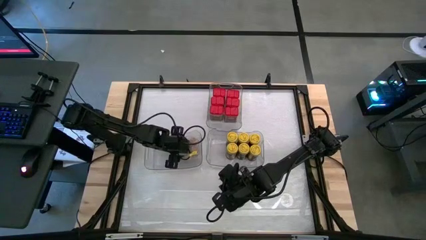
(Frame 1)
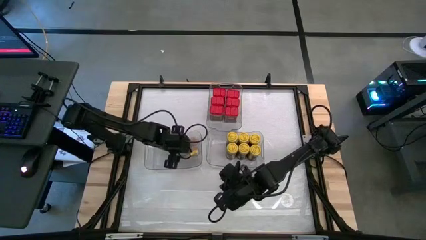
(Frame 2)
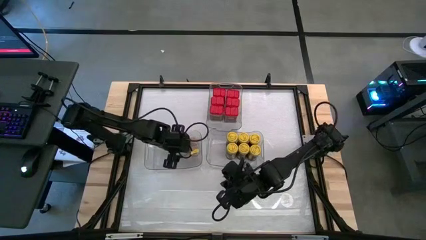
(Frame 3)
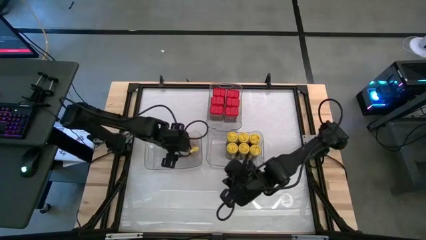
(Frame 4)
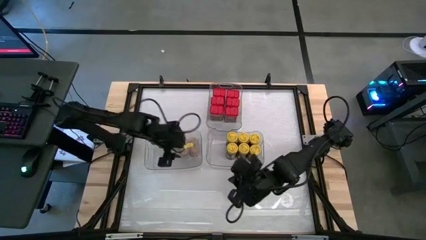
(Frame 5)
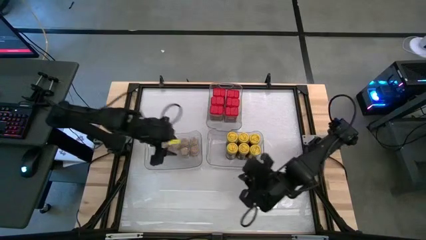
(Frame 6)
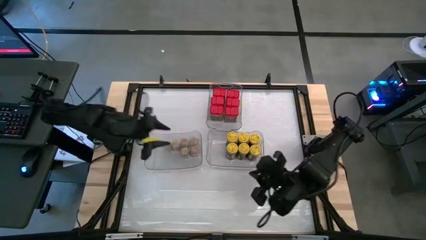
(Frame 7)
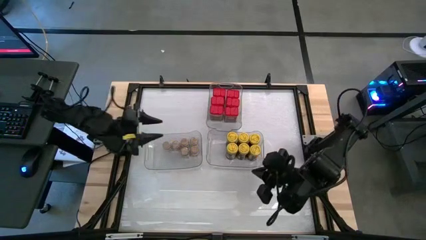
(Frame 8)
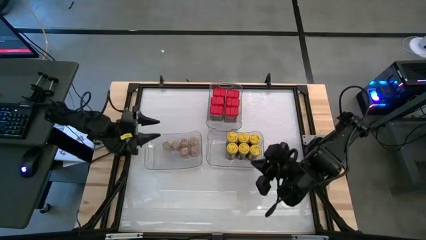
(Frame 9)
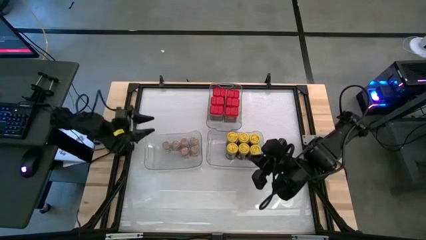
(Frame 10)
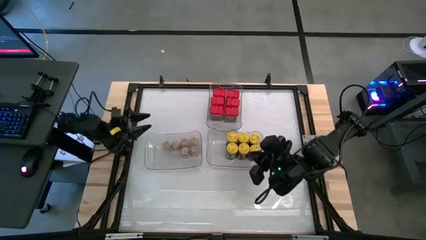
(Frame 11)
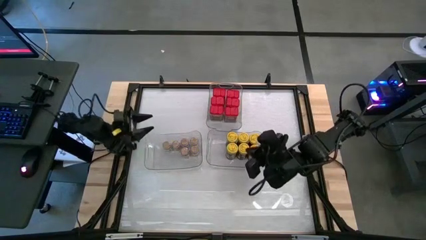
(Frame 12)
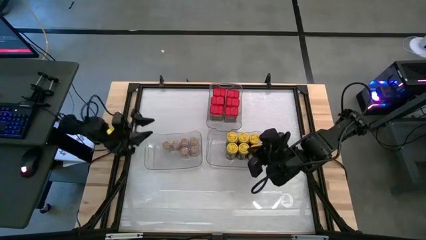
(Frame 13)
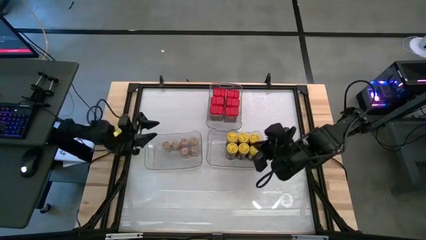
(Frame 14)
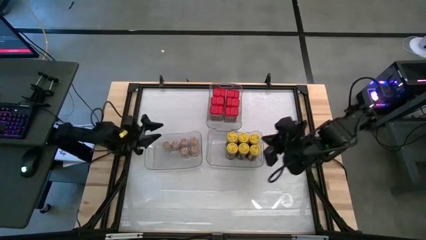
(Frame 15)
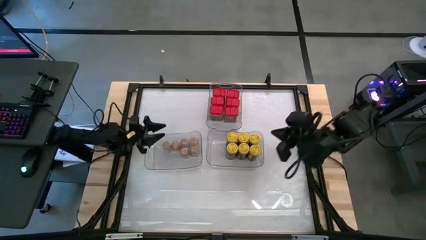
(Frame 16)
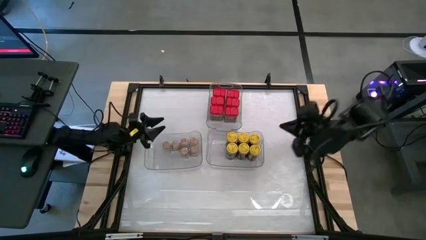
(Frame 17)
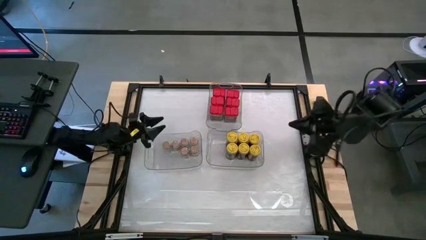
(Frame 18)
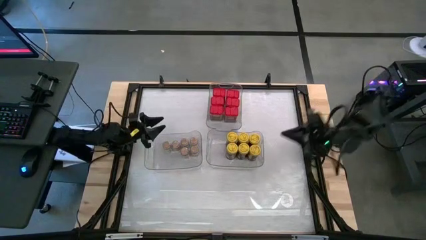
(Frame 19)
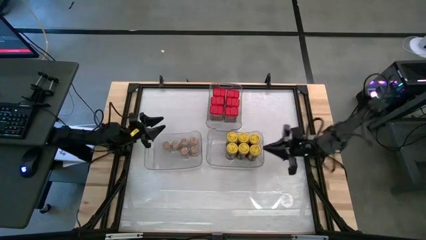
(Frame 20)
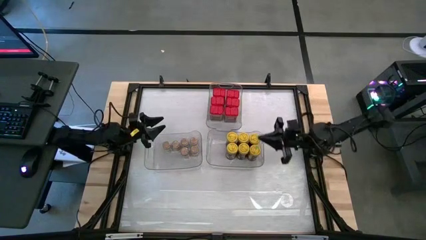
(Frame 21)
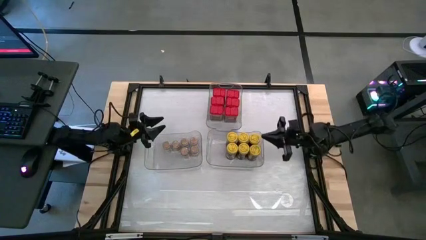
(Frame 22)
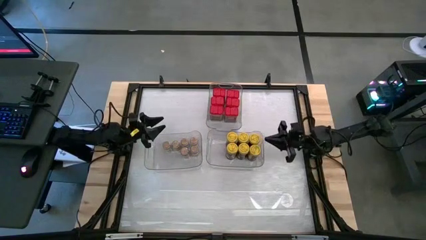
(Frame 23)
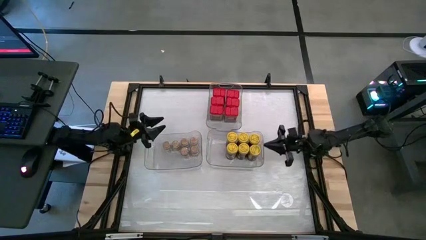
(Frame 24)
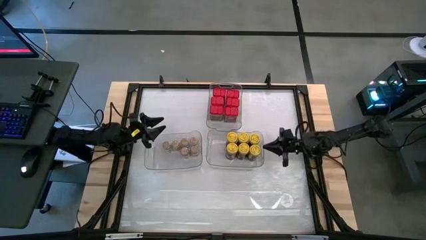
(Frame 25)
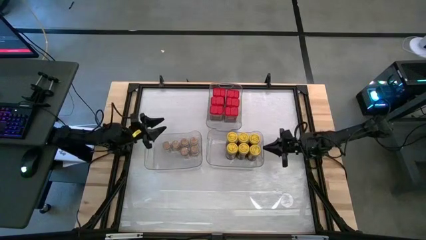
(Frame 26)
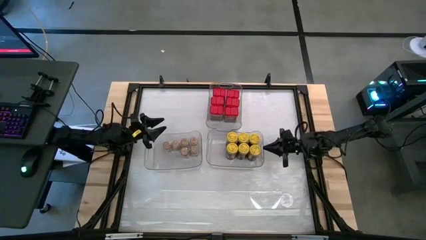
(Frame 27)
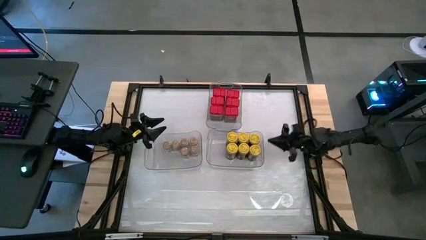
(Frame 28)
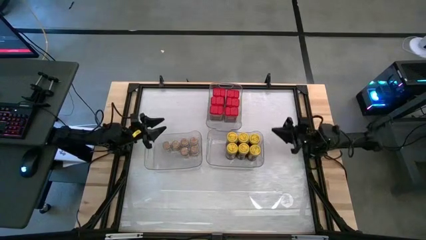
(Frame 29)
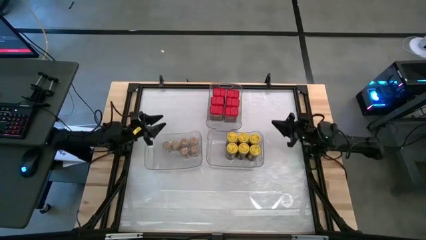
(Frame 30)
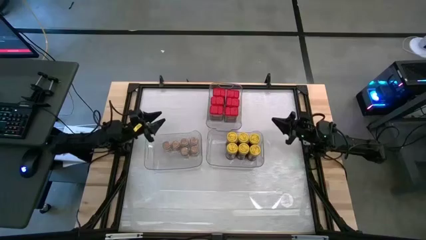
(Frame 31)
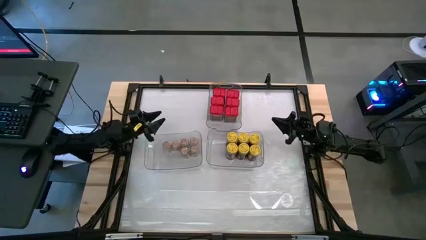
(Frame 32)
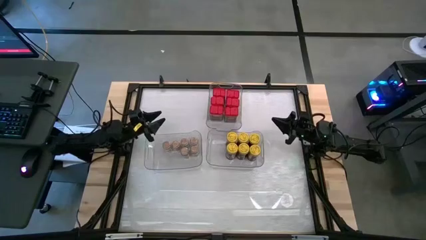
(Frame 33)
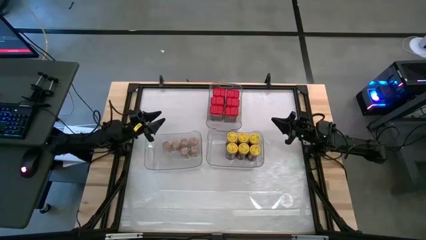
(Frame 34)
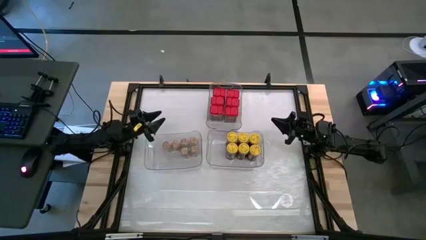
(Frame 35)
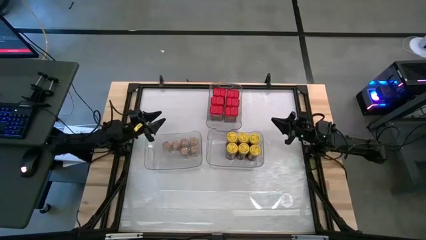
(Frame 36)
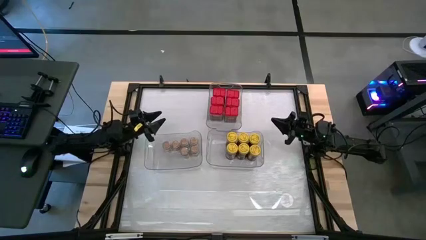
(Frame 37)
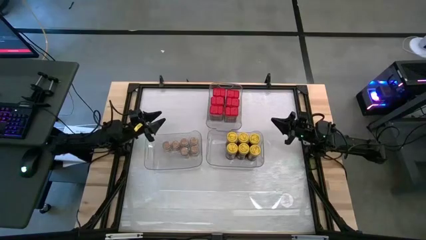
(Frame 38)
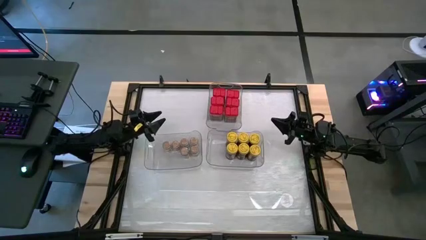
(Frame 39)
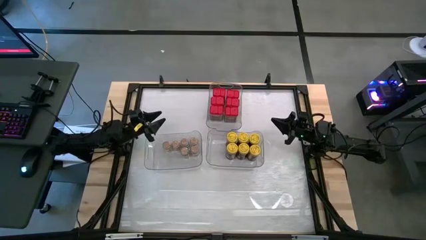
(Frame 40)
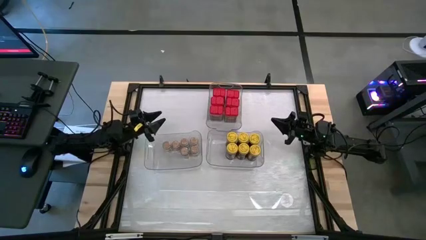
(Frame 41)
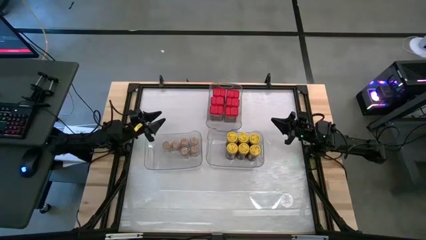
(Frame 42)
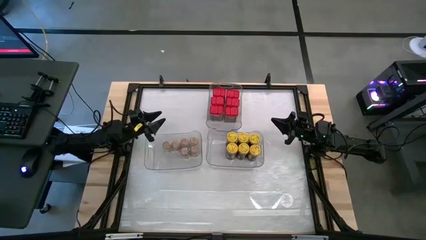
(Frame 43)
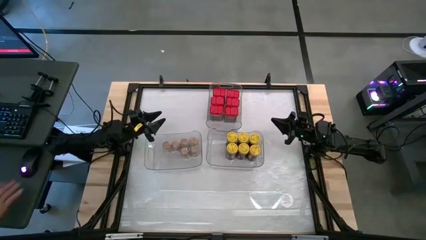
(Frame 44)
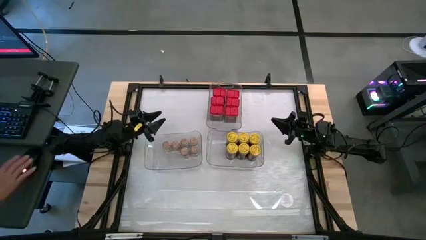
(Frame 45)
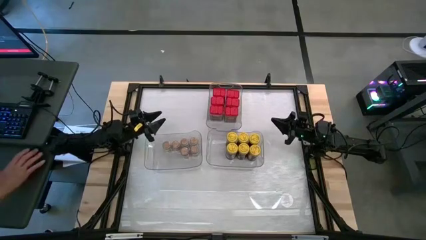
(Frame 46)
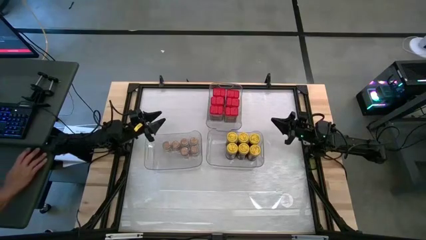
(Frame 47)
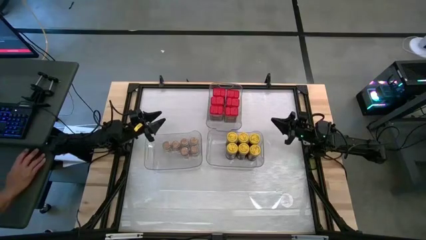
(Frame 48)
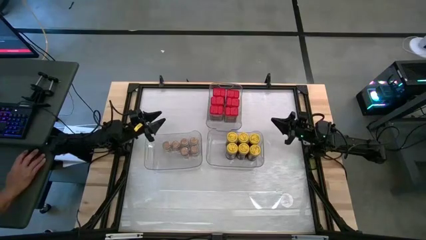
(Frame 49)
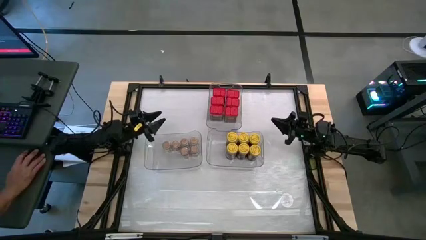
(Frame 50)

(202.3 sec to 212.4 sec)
Task: Sort spices by type
Return to Home Position

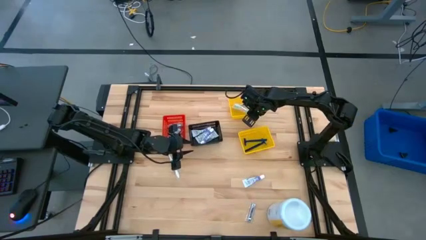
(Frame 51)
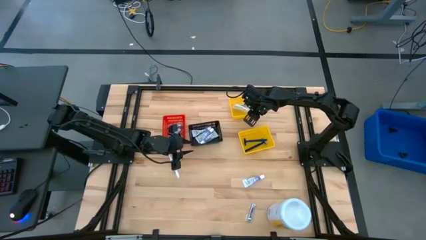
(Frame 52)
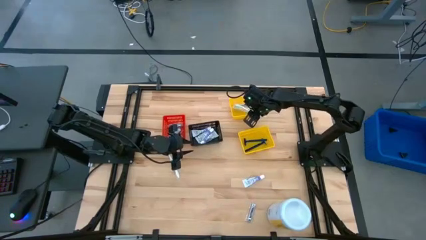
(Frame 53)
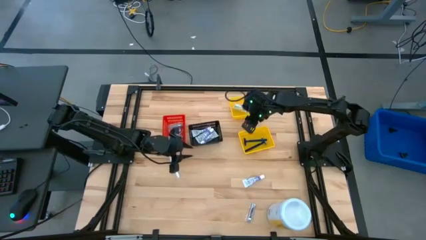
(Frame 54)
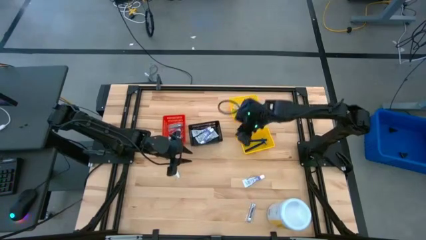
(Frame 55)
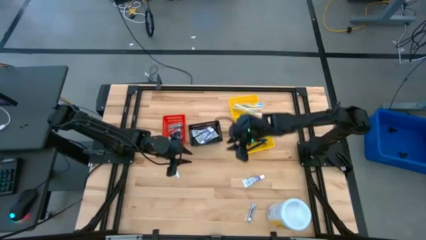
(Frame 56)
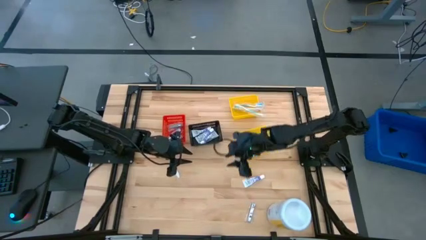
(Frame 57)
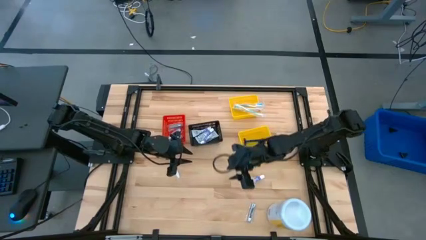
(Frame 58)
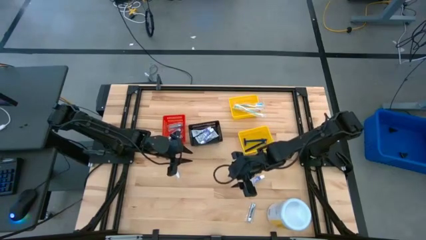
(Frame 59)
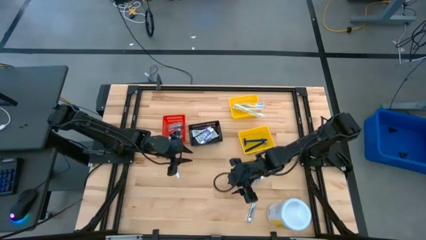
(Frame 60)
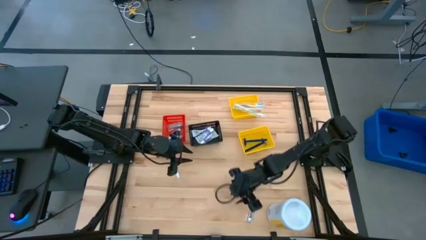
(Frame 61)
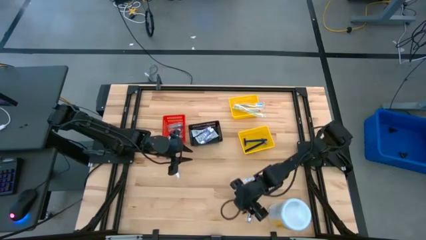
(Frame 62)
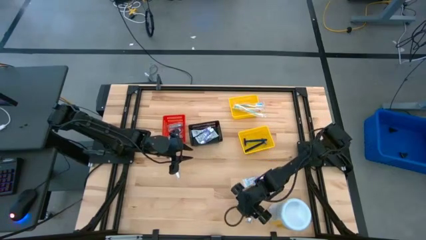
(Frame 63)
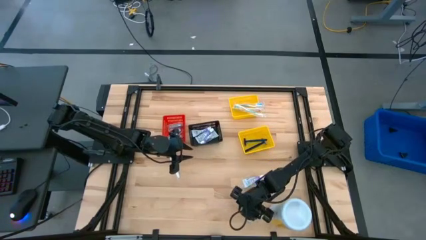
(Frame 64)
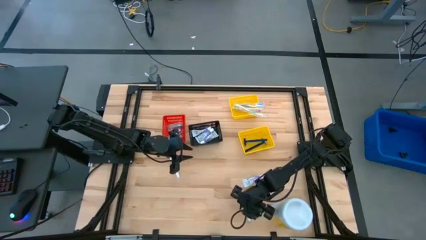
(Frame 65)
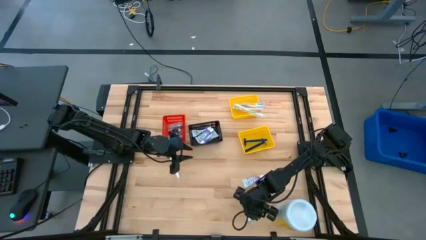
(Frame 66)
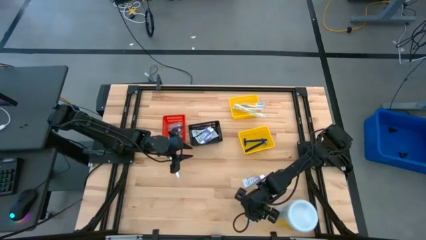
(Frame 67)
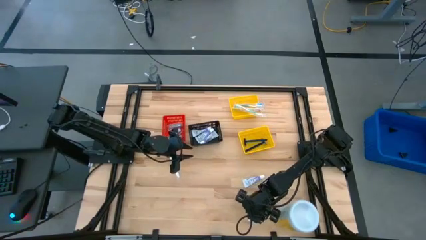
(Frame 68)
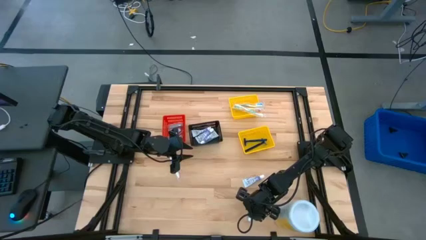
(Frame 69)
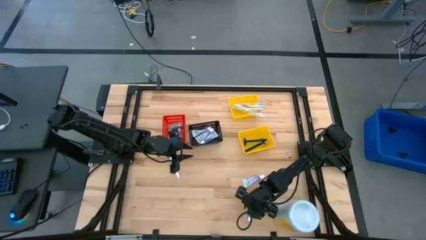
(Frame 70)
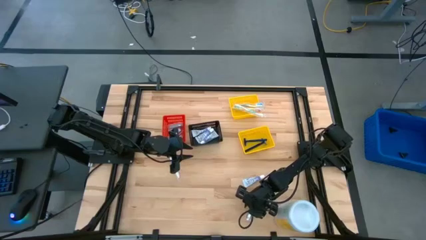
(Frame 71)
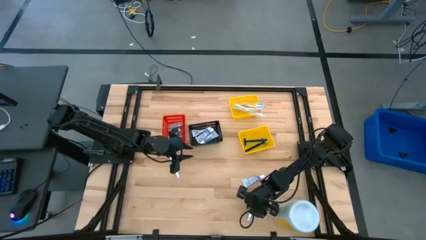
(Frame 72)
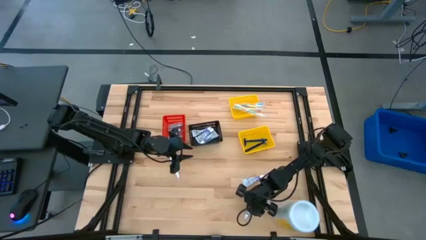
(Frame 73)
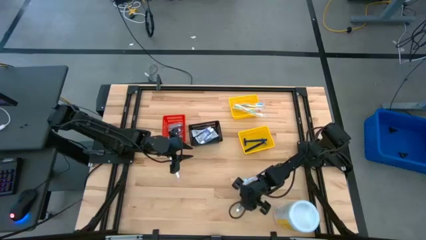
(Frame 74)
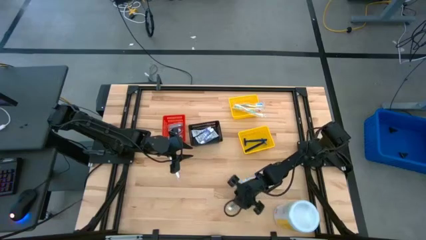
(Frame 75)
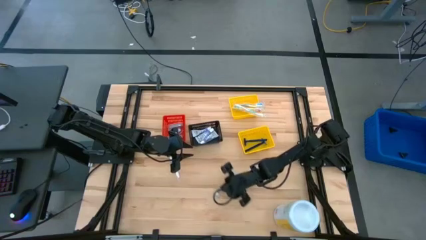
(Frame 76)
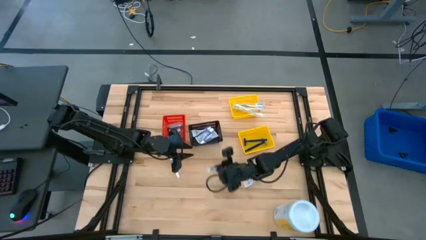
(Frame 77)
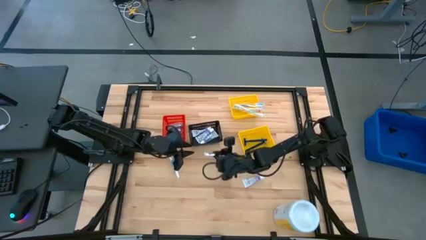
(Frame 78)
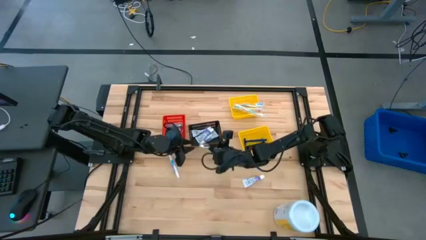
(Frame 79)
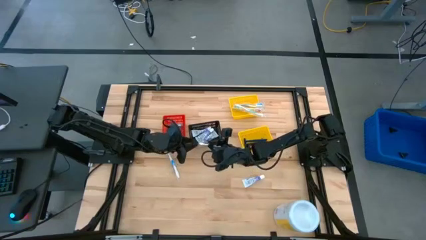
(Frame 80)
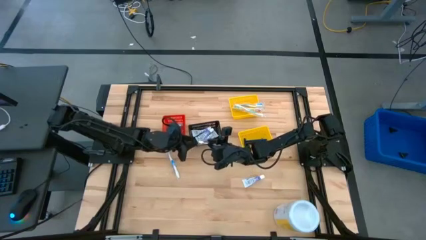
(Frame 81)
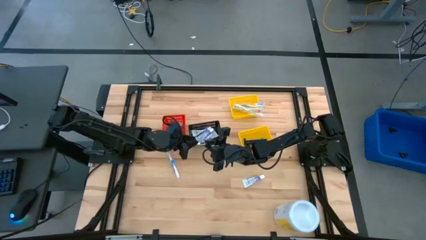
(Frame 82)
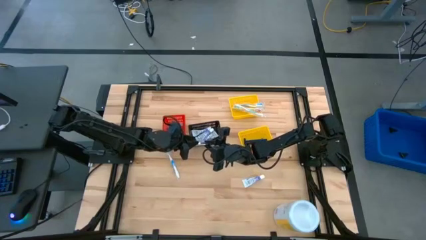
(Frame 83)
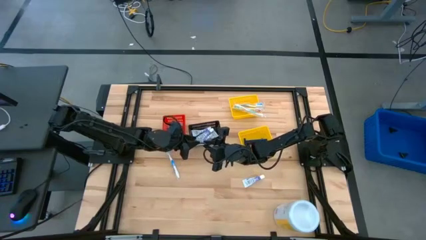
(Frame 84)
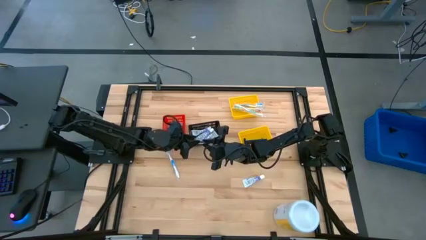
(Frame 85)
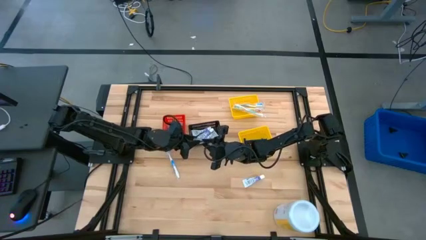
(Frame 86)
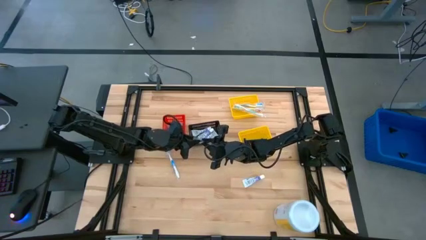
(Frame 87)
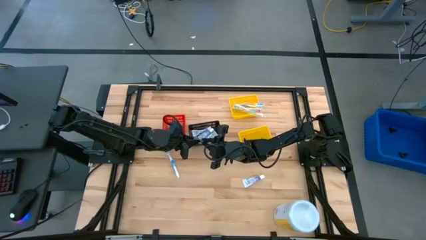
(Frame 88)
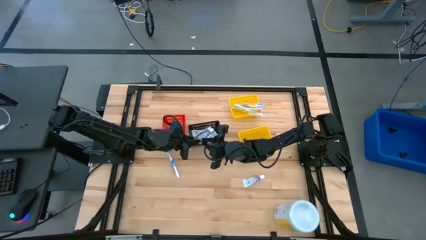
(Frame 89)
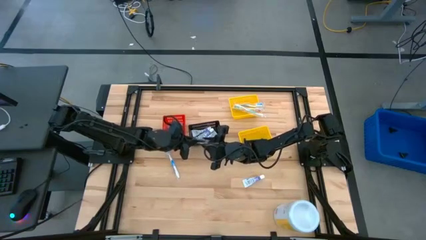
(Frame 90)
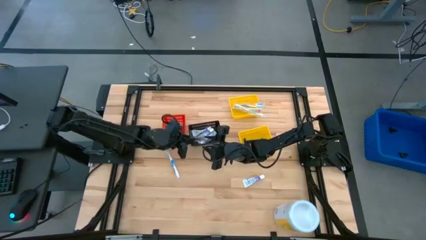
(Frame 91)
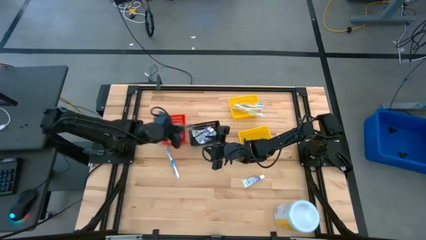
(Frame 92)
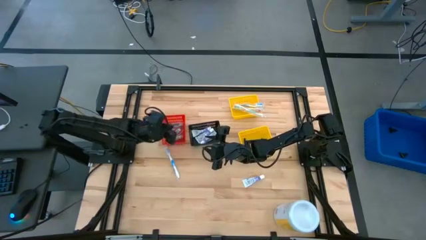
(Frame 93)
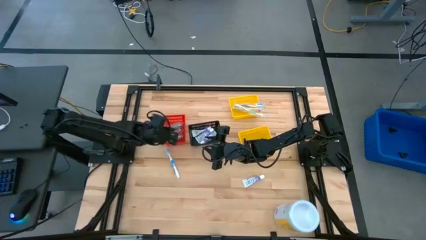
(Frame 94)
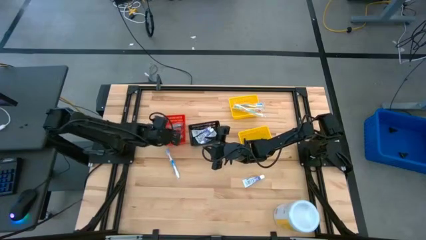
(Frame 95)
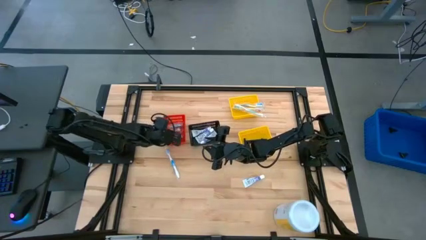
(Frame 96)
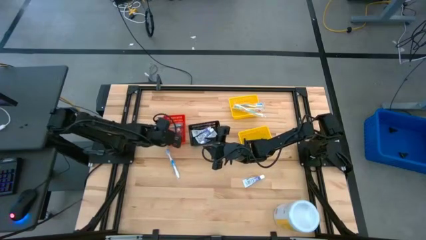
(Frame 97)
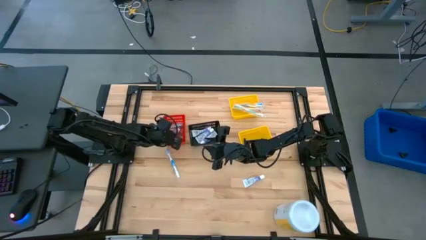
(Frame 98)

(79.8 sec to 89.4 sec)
Task: Pick & Place Travel size toiletries
Put the silver nail cutter into the red bin
